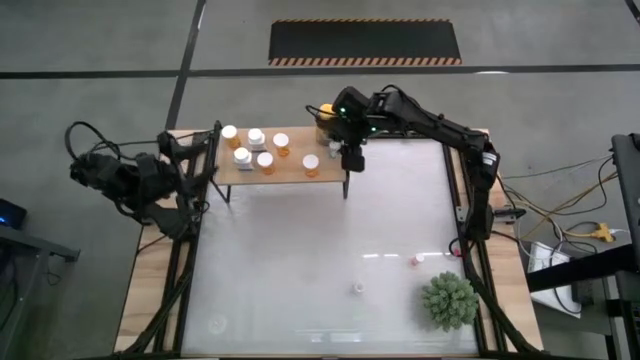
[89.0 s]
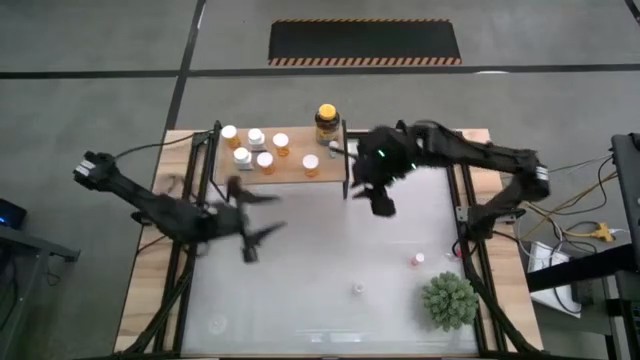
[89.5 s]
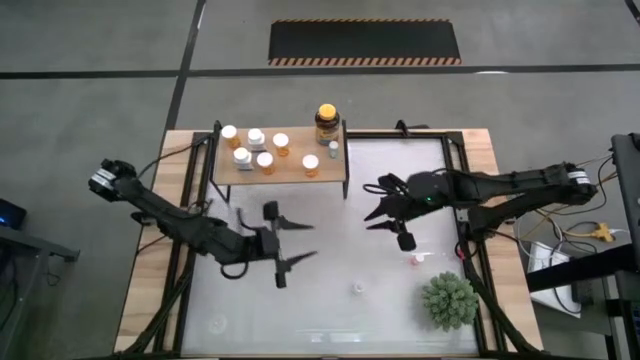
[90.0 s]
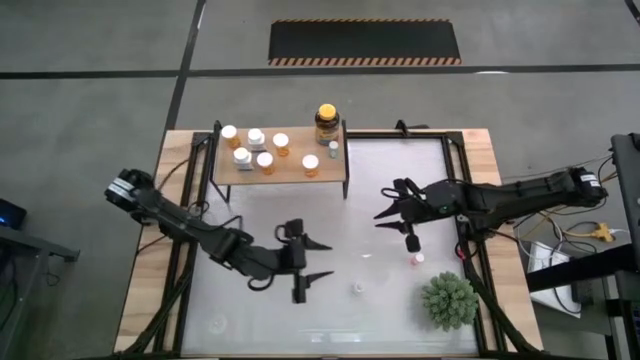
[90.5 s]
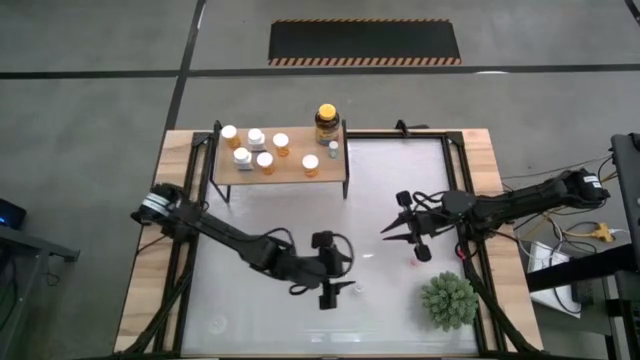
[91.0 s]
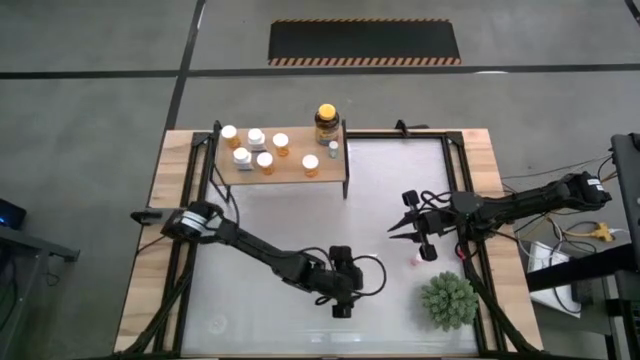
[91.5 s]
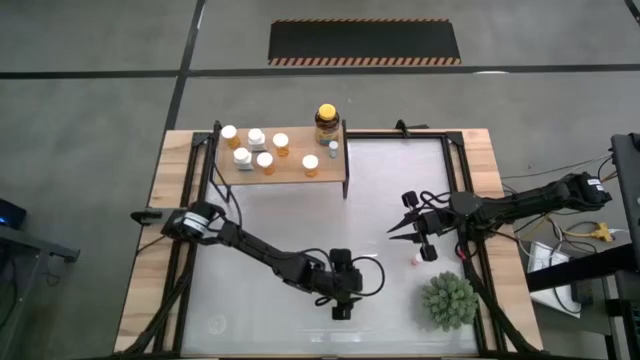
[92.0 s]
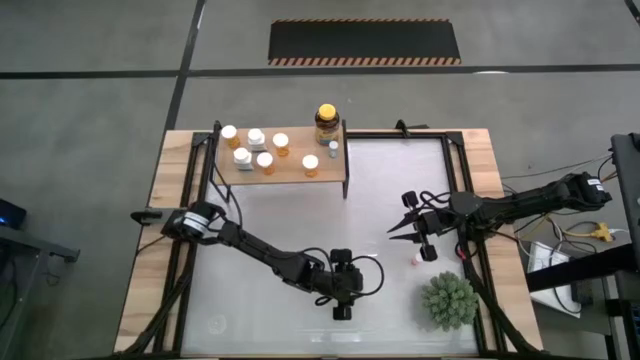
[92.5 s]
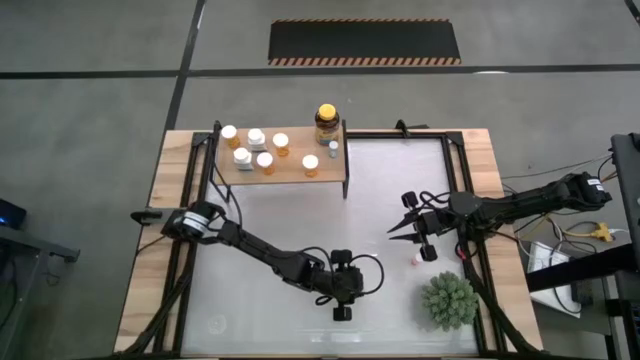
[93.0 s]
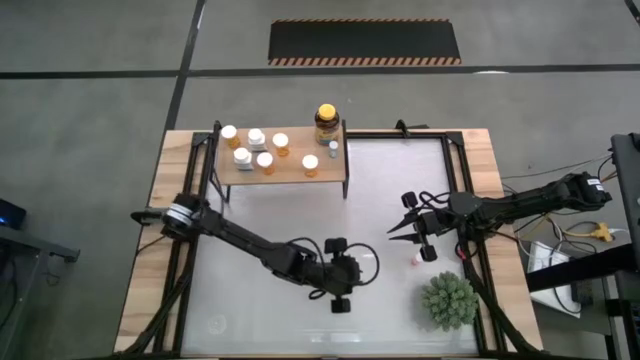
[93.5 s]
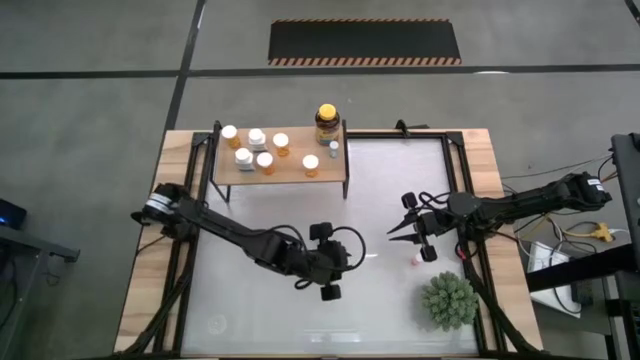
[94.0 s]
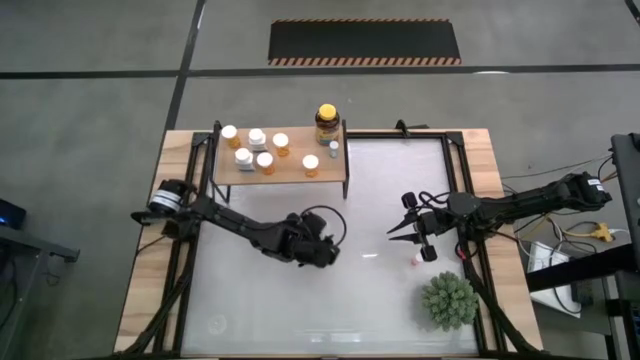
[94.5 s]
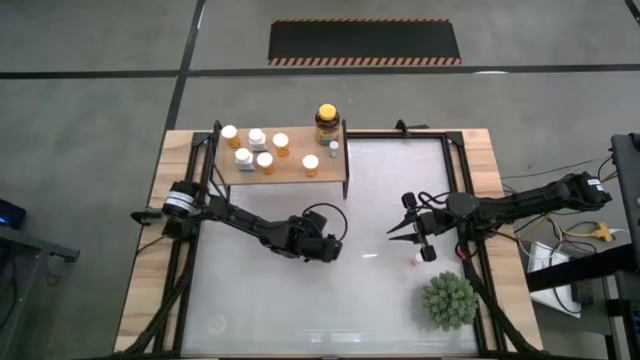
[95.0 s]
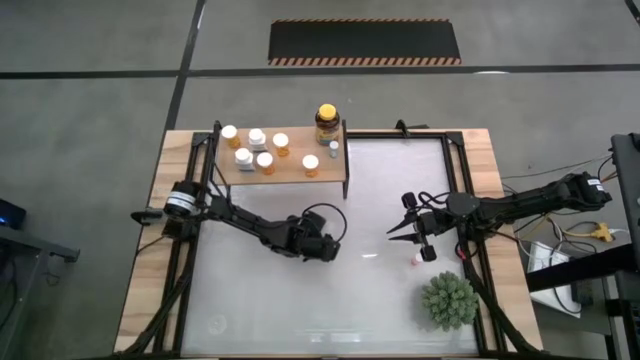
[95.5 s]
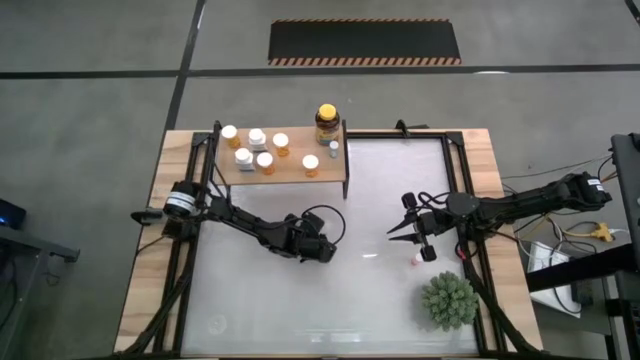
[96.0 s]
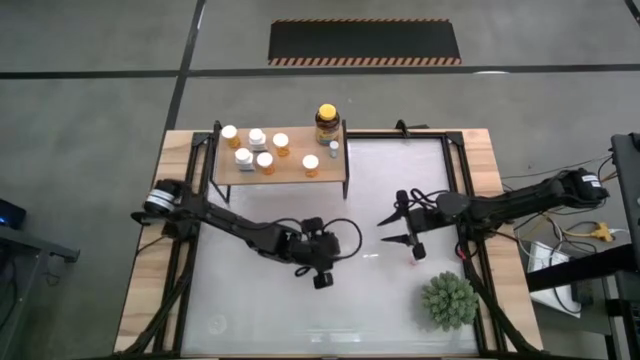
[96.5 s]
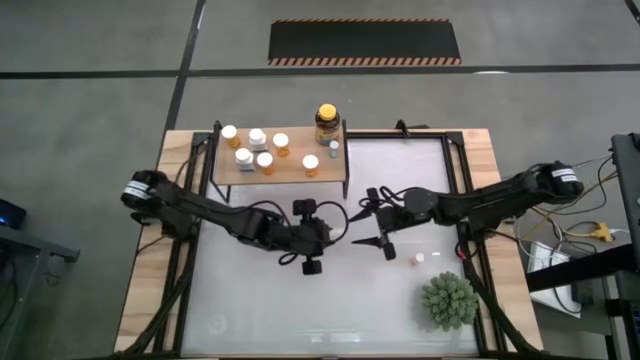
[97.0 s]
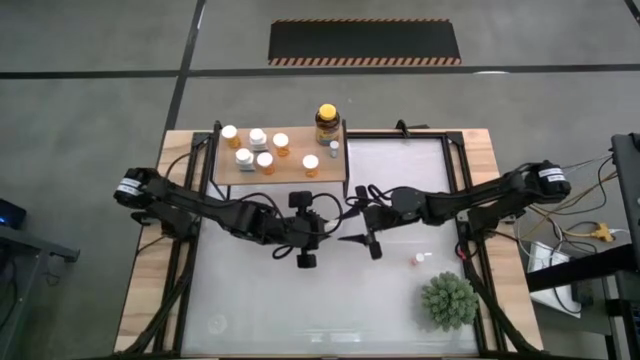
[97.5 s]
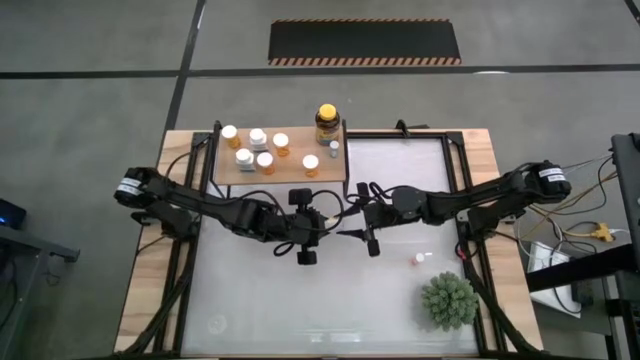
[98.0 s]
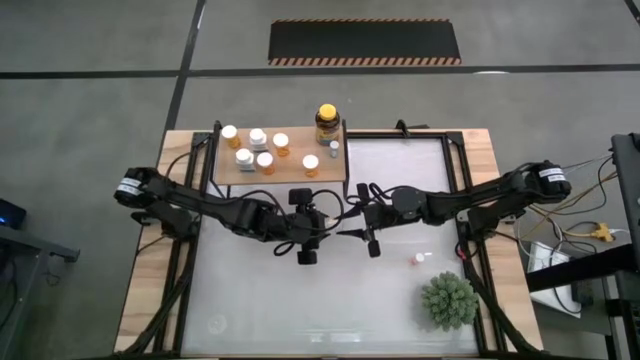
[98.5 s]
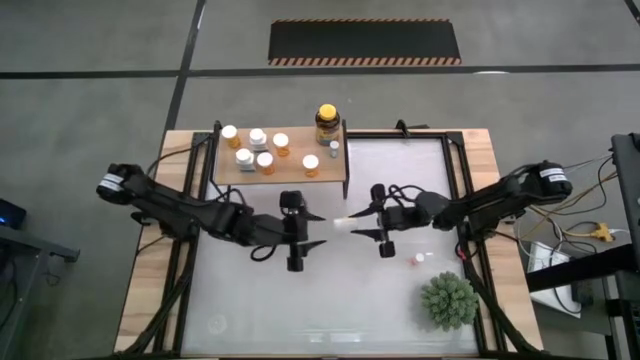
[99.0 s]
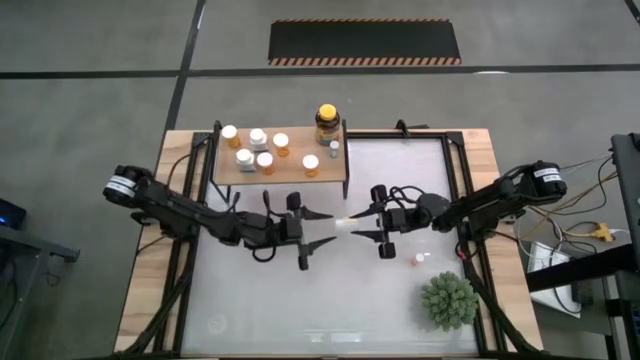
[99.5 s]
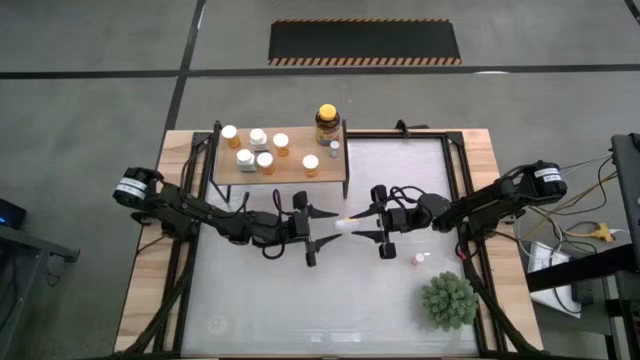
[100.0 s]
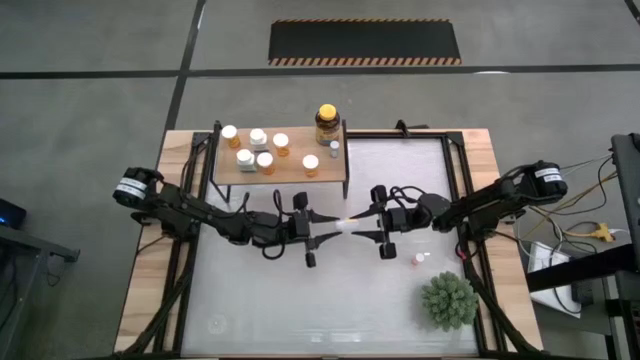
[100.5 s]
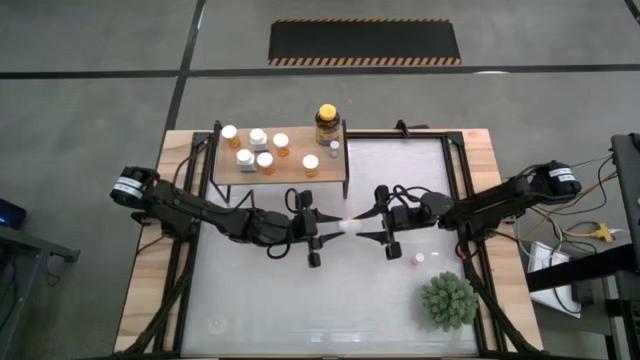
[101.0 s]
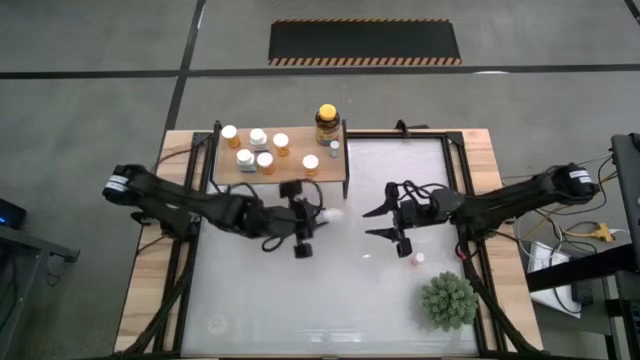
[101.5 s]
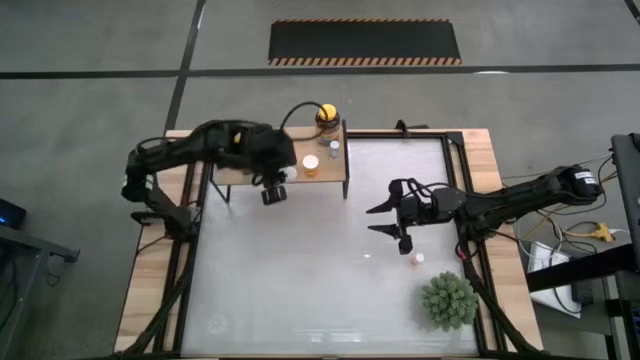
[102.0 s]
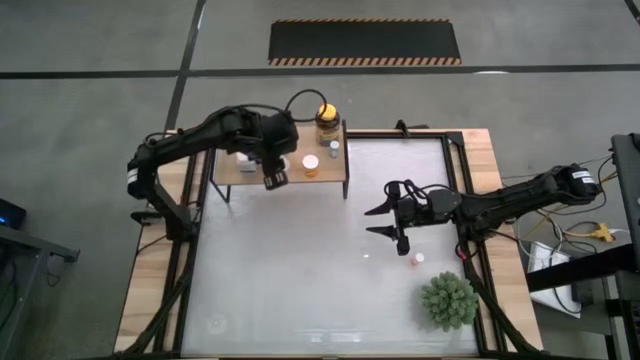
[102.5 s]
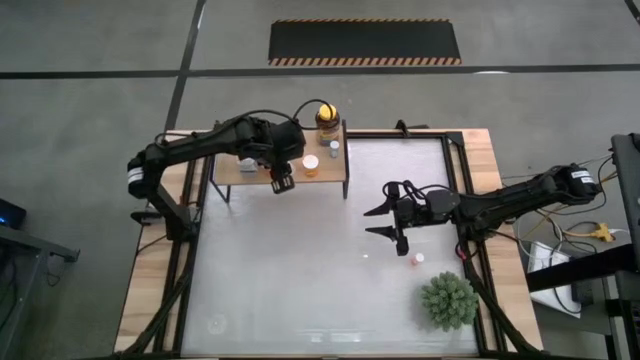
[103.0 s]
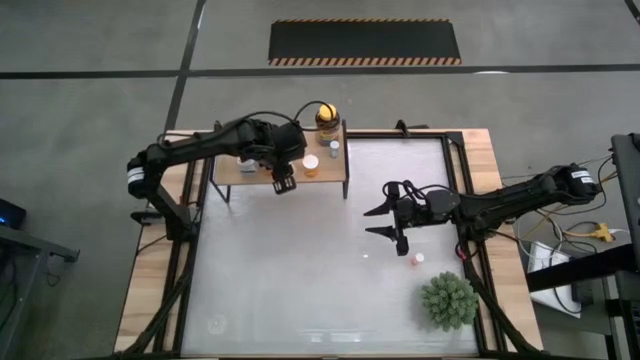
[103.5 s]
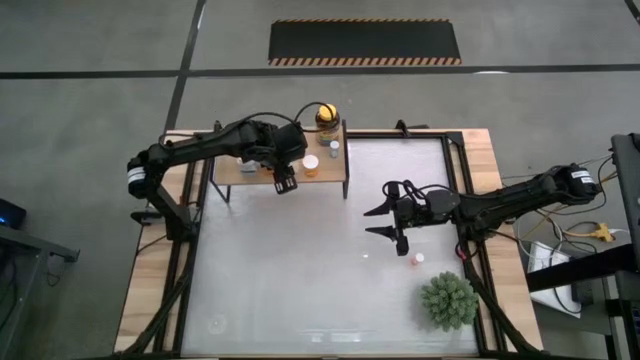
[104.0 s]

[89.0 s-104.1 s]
Task: Pick and place medicine bottles onto shelf by color
Put the white pill bottle on the shelf

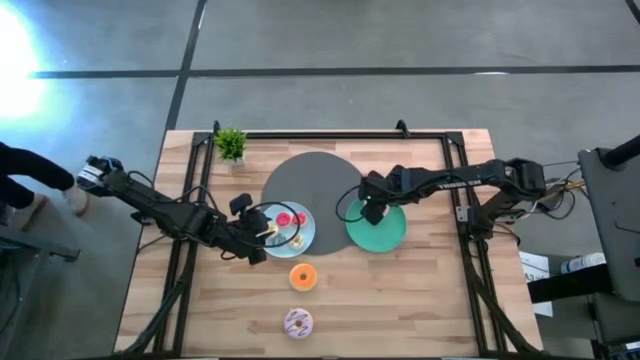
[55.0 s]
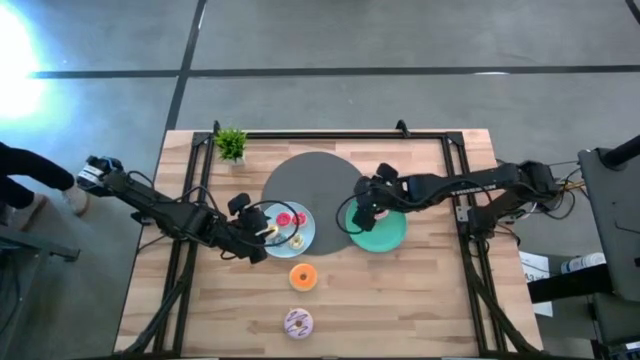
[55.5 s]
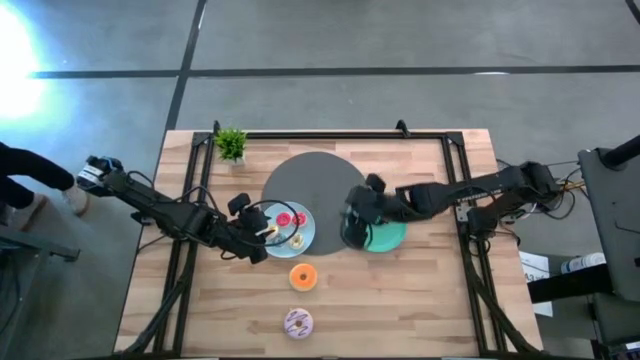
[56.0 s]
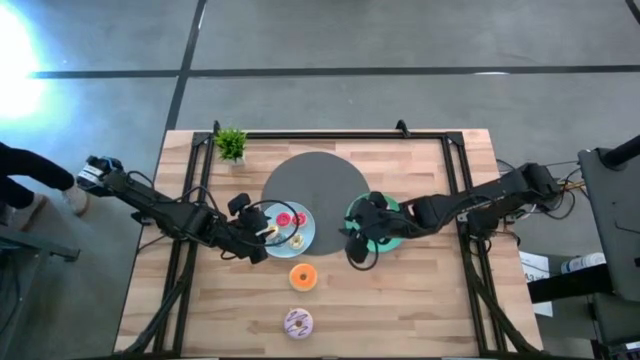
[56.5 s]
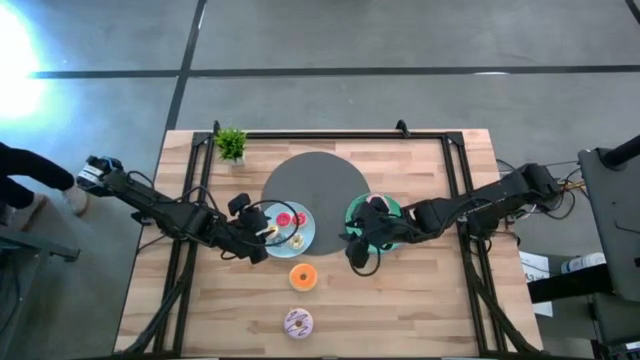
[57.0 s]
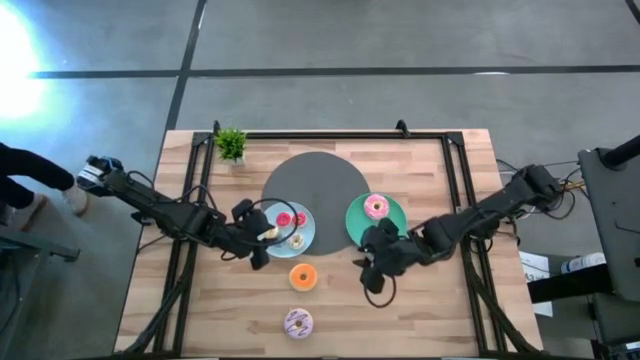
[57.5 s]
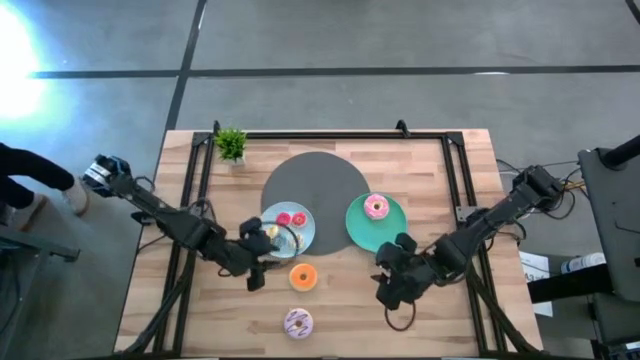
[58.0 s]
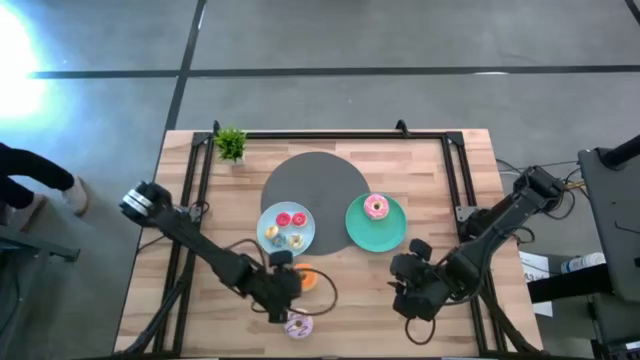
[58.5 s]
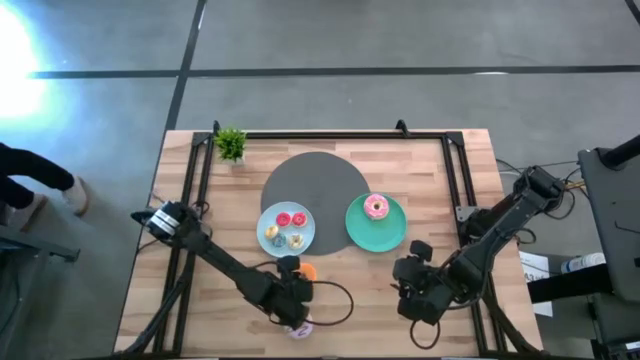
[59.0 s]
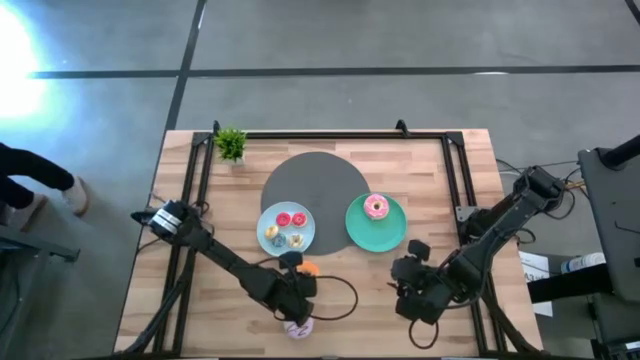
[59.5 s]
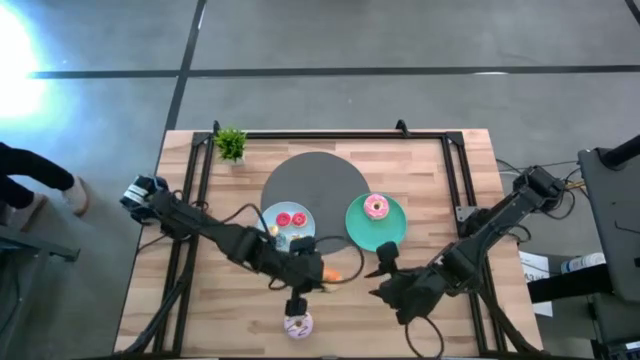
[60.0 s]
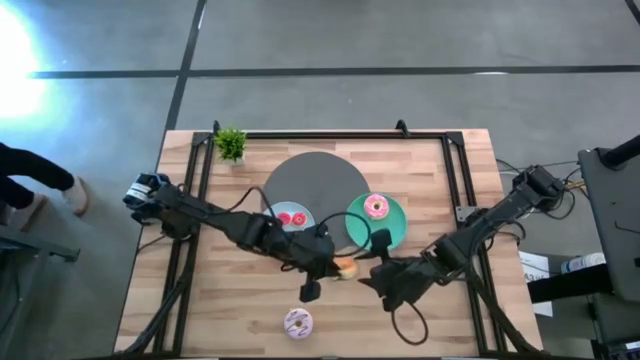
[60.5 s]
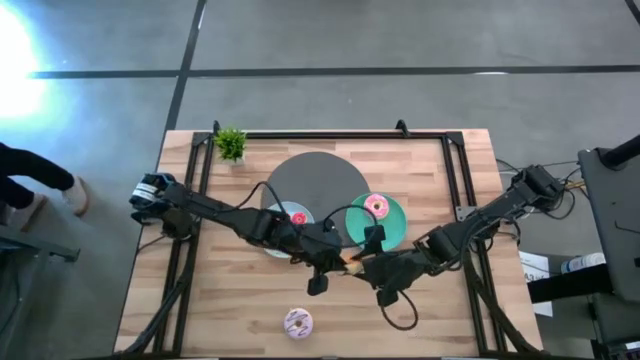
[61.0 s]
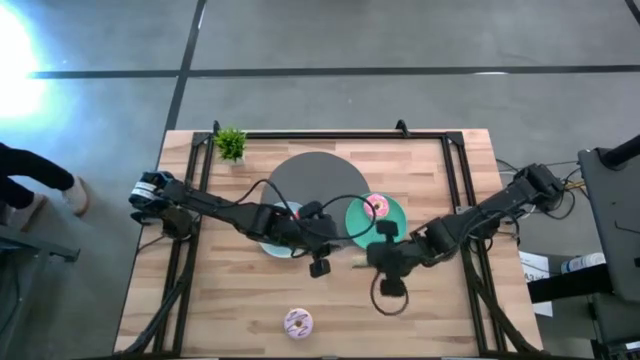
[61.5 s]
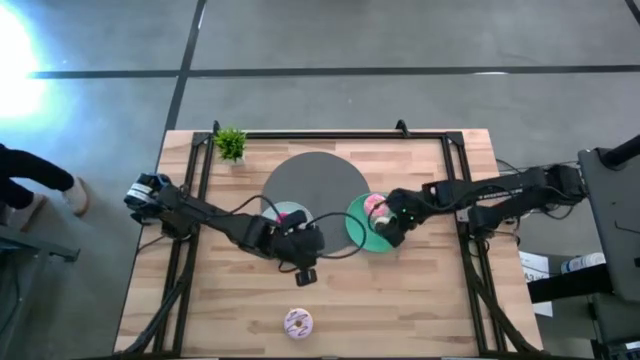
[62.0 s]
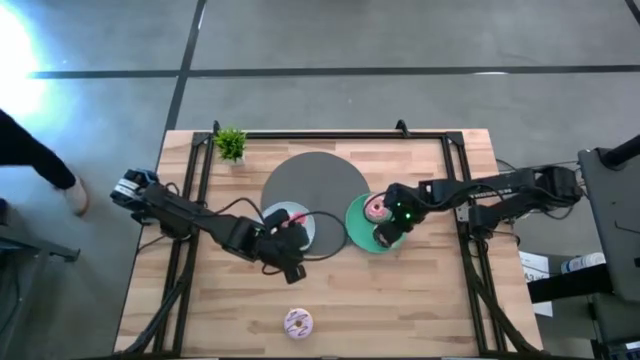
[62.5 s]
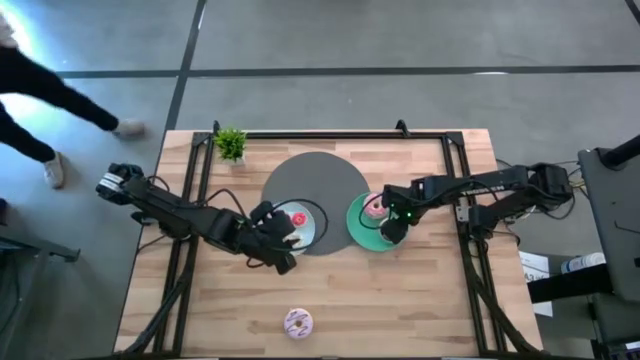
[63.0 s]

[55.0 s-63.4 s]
Task: Pick & Place donuts
Put the big orange donut on the green plate
